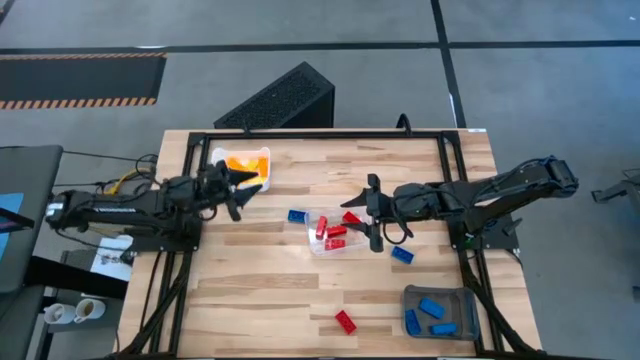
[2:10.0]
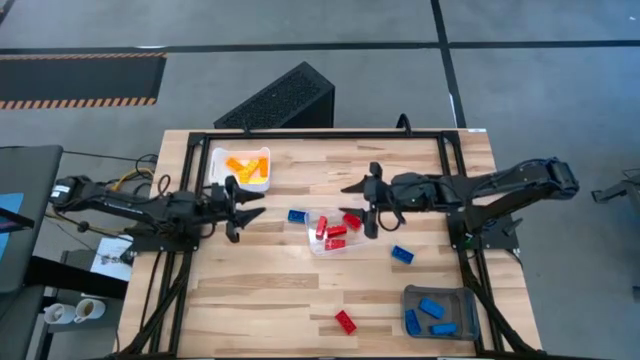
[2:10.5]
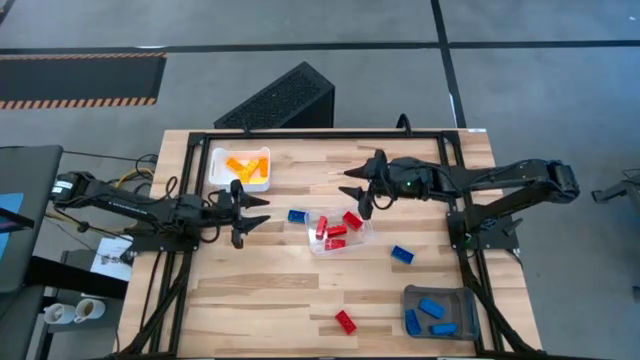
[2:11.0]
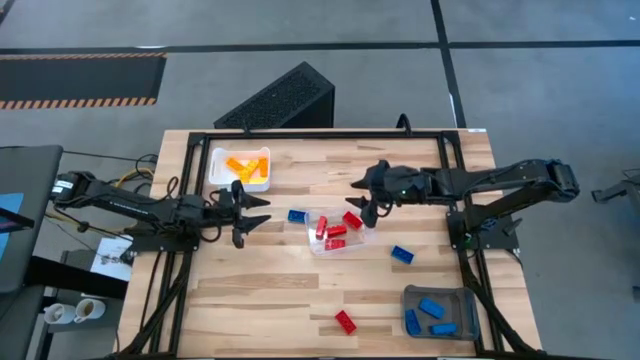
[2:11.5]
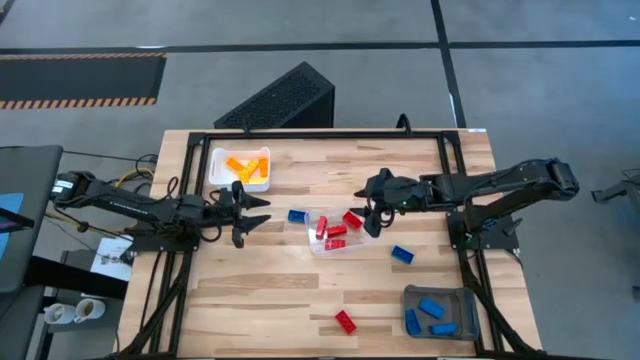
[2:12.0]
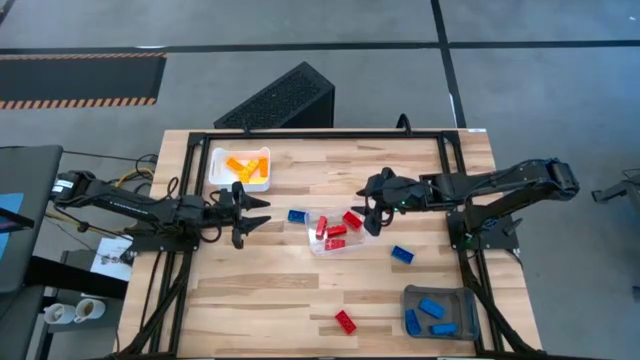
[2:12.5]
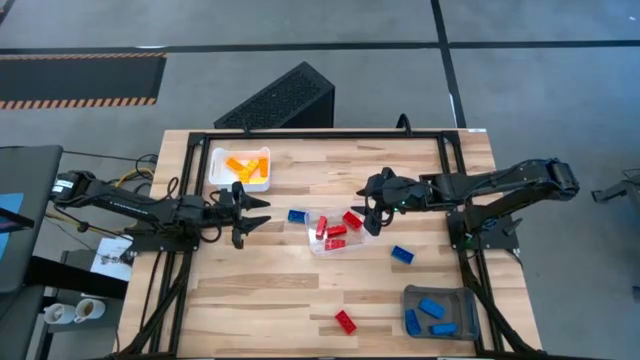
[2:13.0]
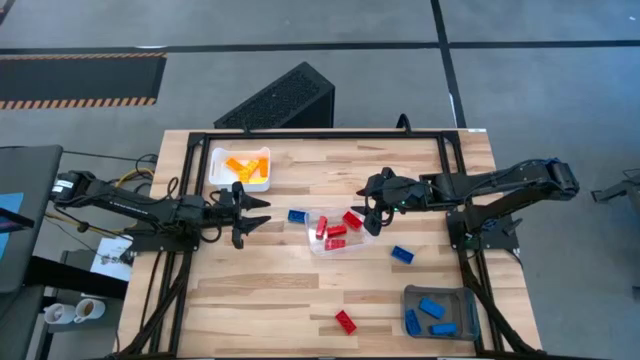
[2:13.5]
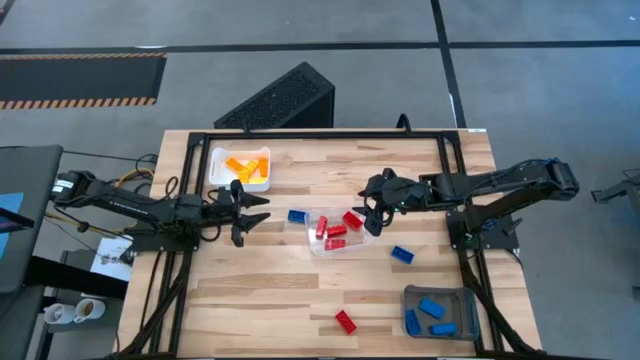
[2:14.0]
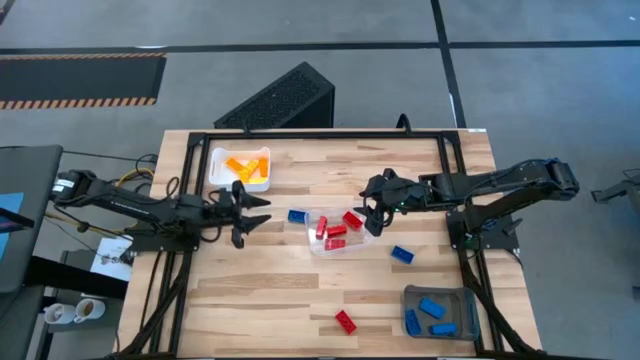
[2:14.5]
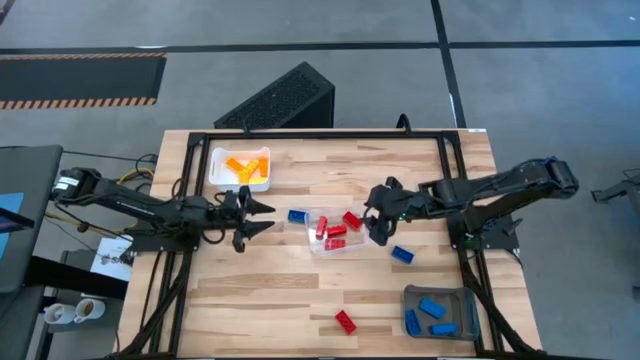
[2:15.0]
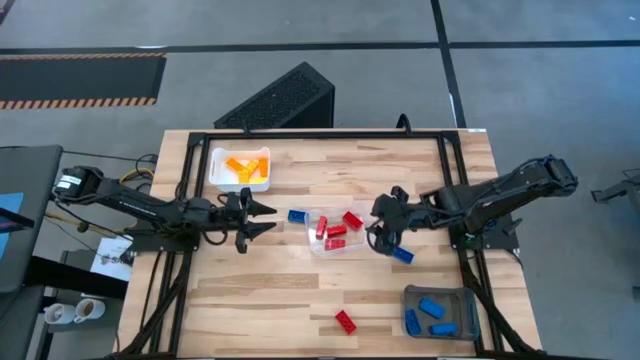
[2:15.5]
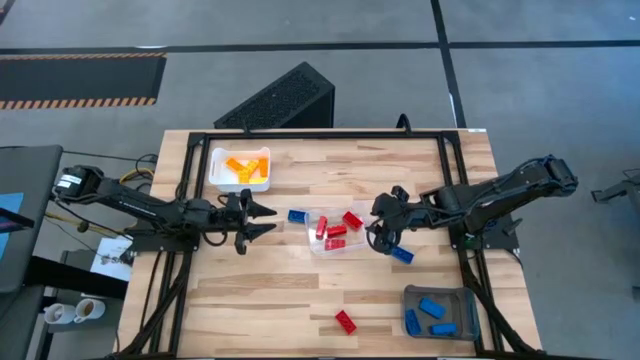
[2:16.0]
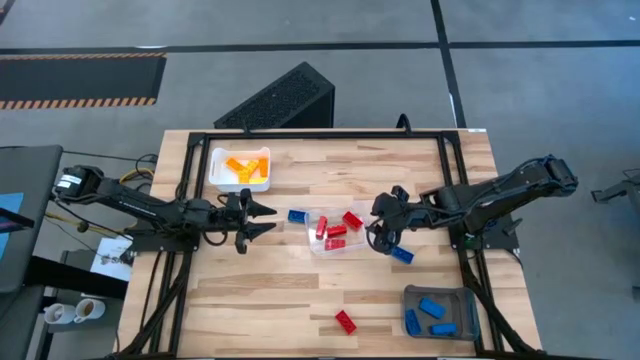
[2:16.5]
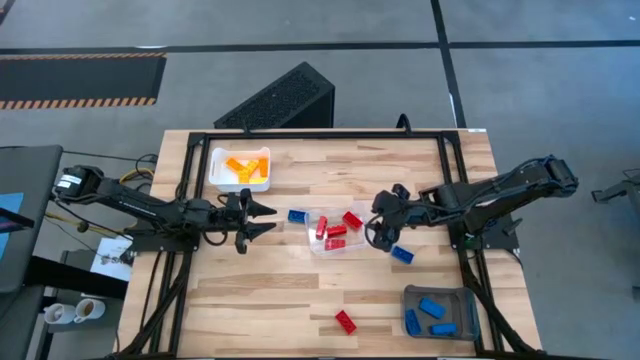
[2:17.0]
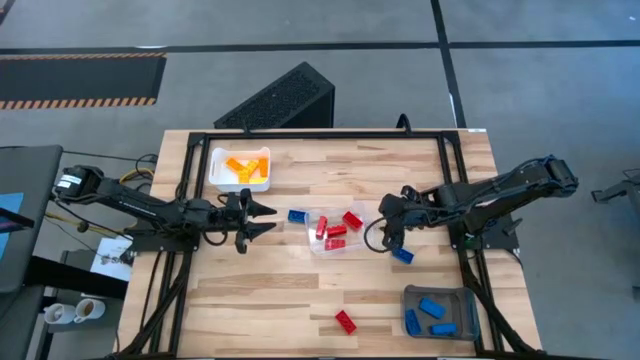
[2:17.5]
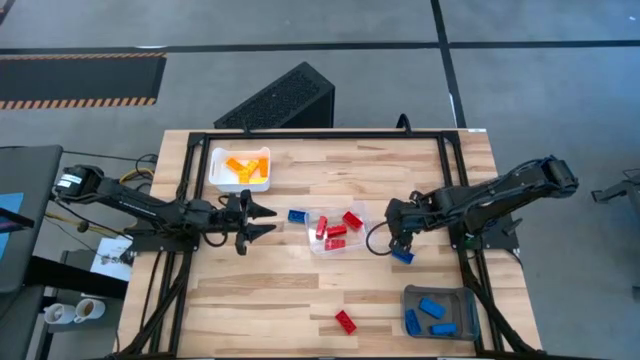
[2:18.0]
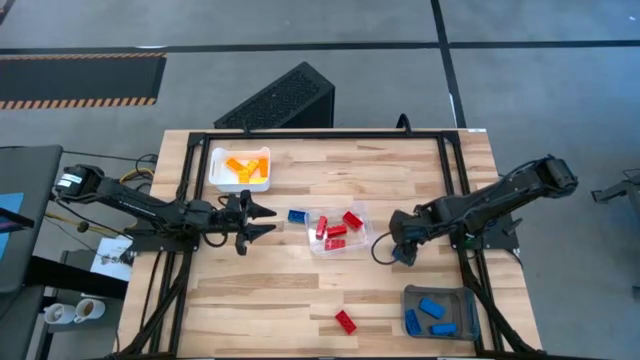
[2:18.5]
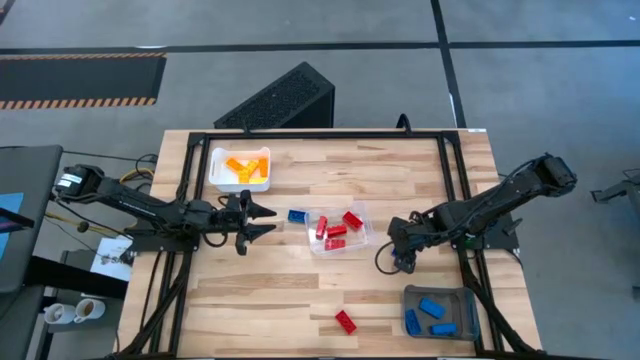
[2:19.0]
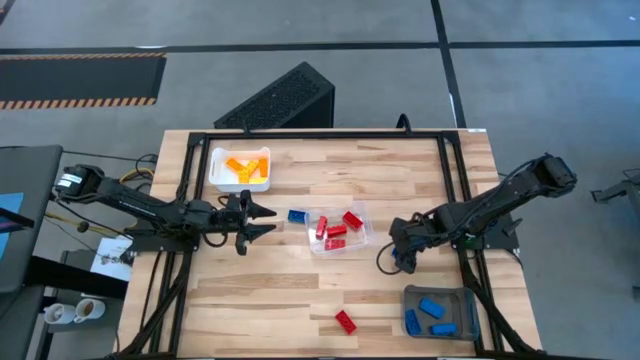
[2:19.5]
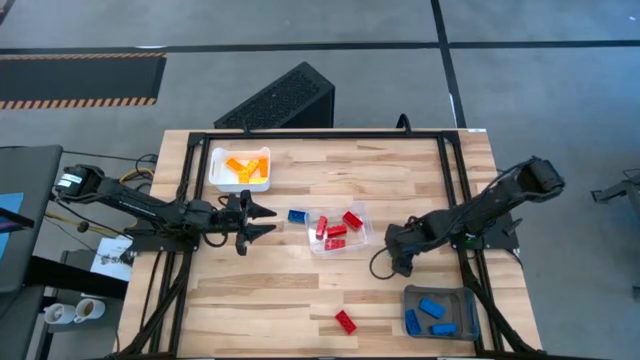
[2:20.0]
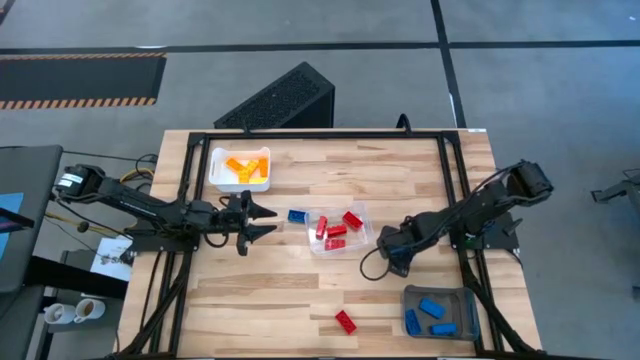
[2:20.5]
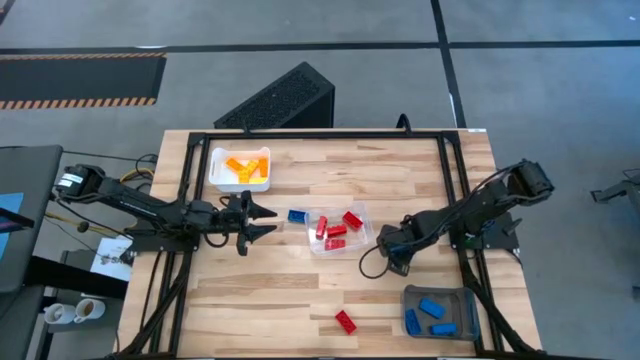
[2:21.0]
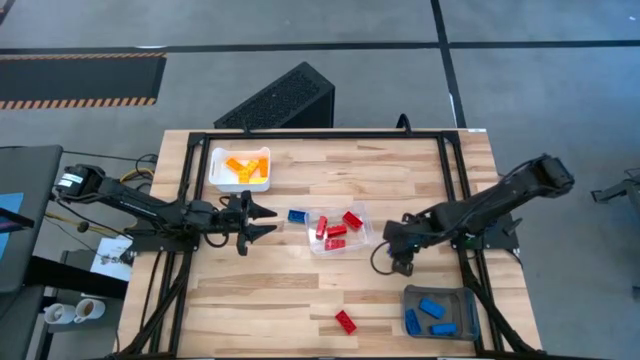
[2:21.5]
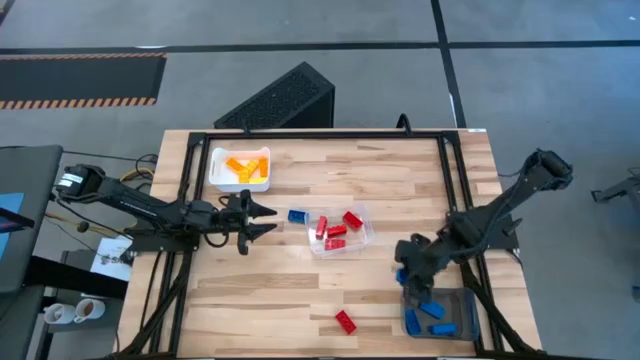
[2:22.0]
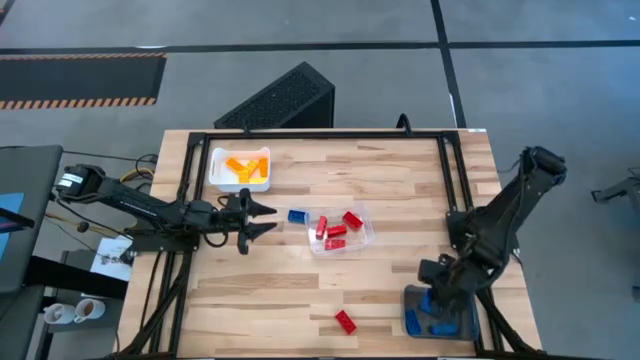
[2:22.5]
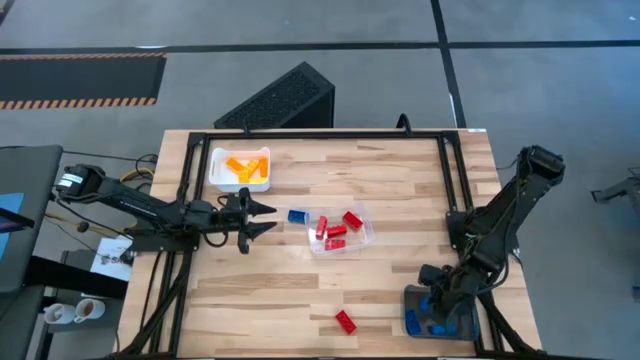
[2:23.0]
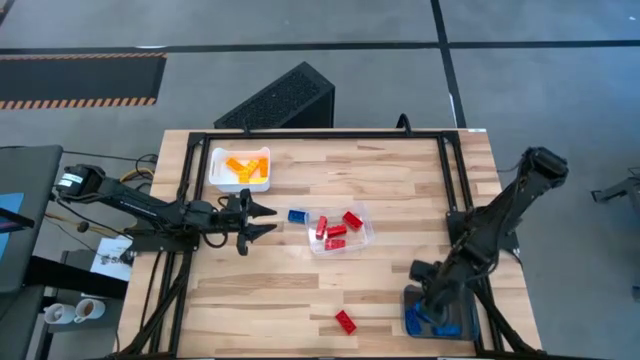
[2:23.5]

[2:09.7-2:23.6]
Task: Sort & place blocks by color
Put the blue game piece into the black bin

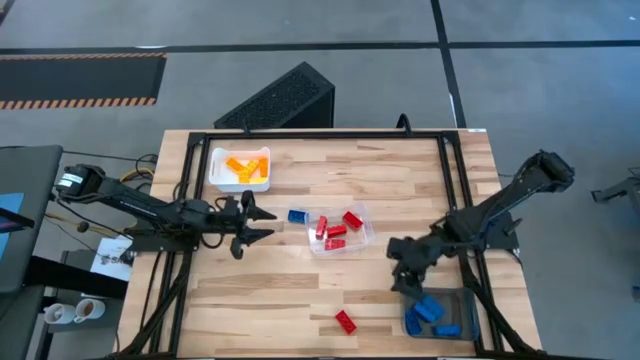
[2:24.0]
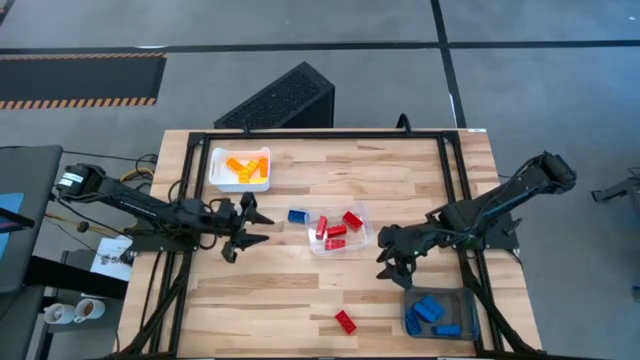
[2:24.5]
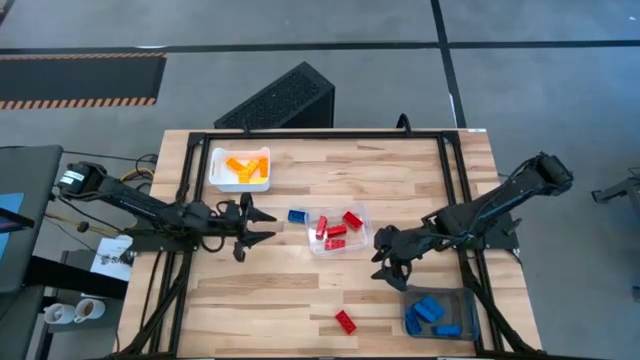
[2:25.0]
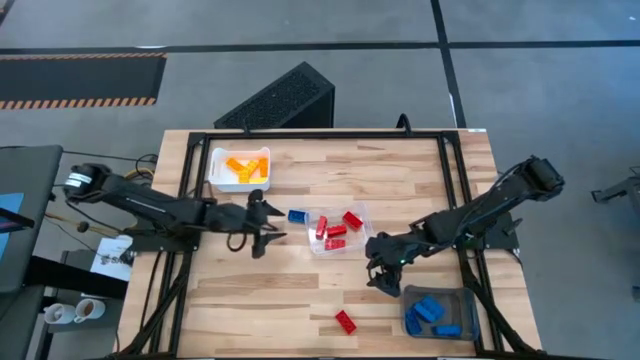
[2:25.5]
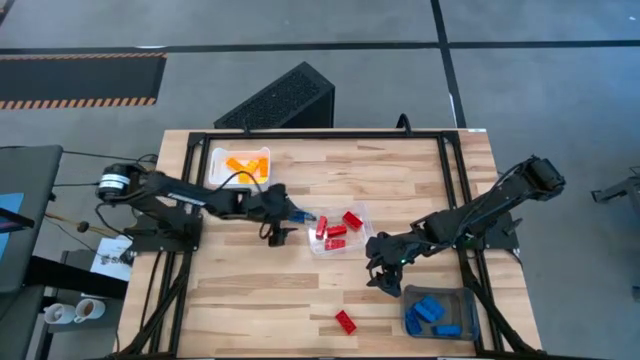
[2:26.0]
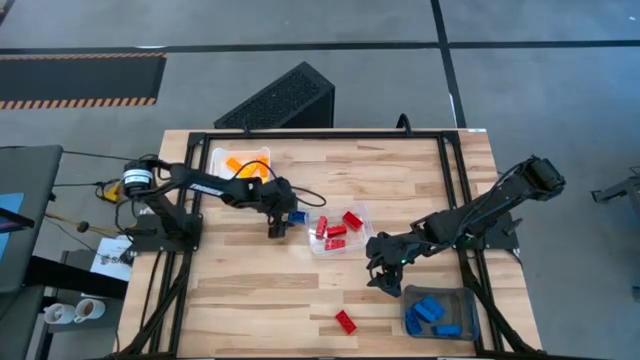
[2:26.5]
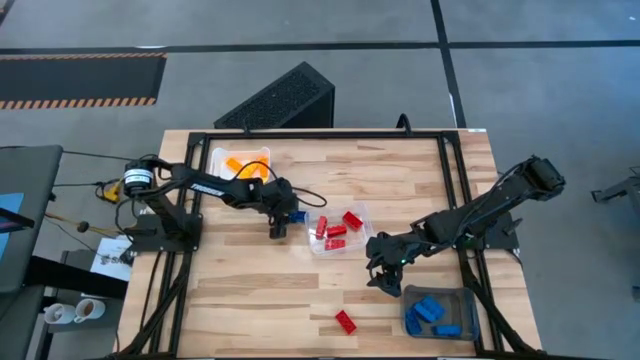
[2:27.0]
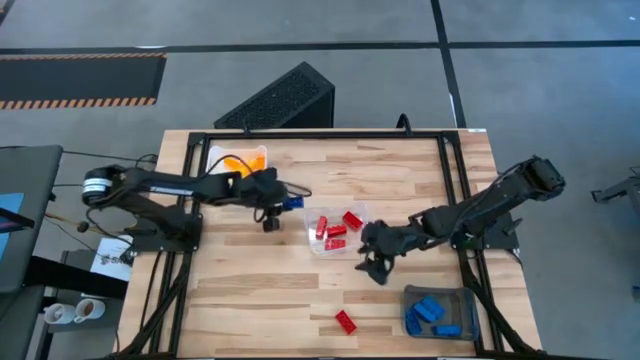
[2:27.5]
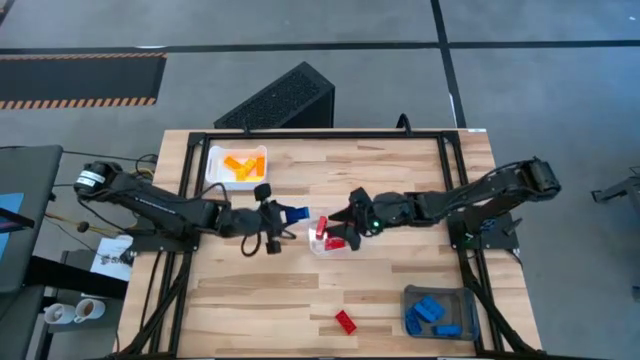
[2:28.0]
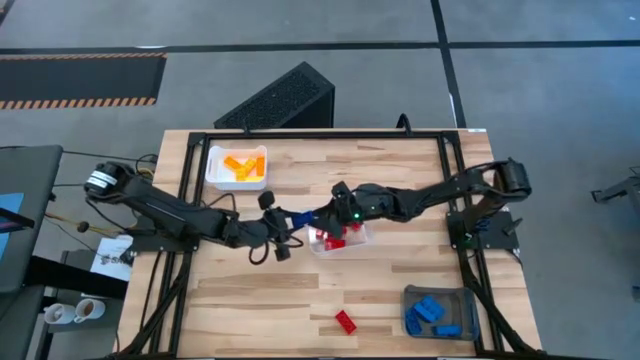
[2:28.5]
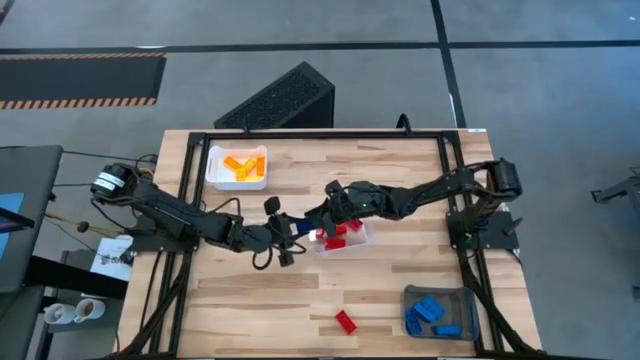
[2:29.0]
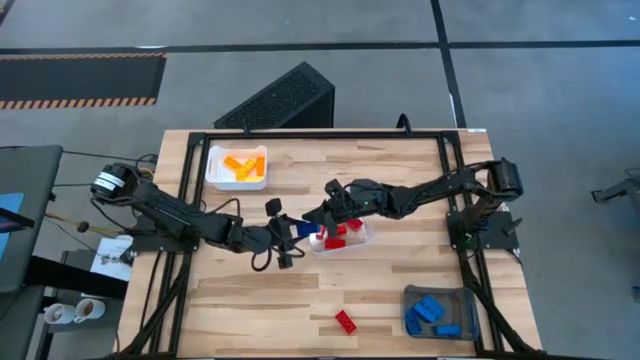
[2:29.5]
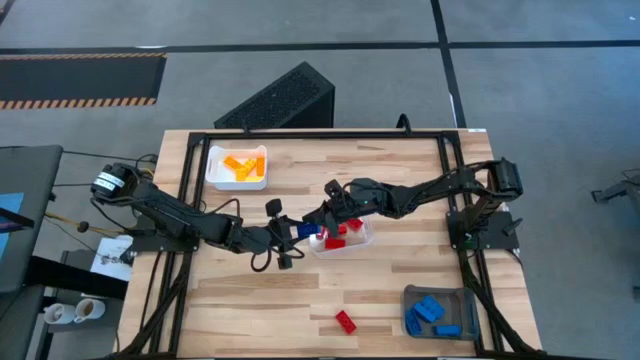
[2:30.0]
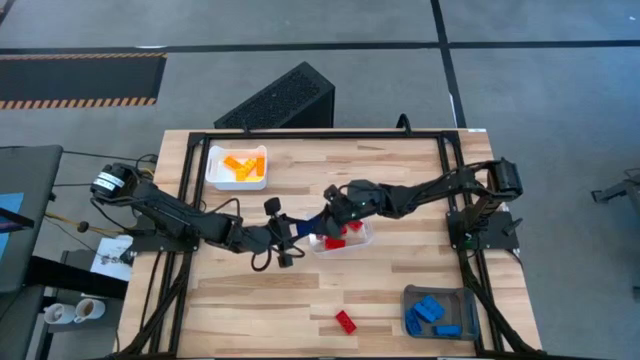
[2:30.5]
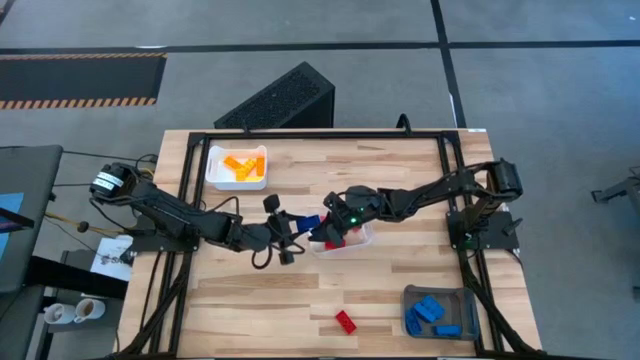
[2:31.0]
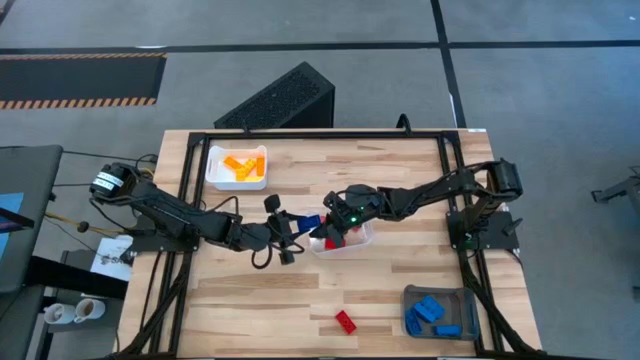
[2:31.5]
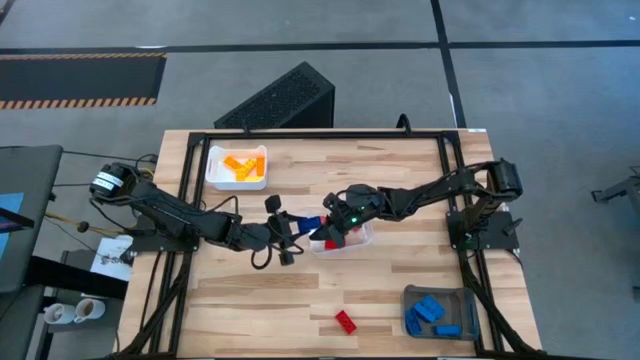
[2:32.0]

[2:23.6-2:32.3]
Put the blue game piece into the black bin
